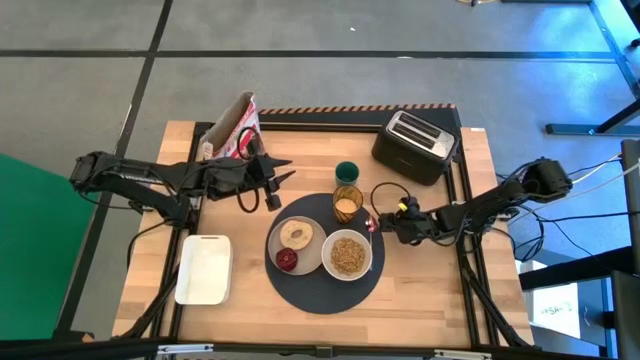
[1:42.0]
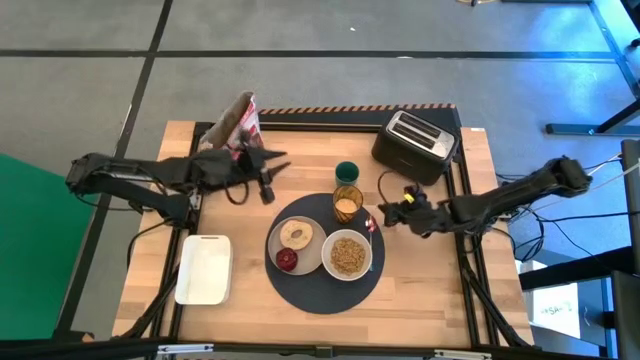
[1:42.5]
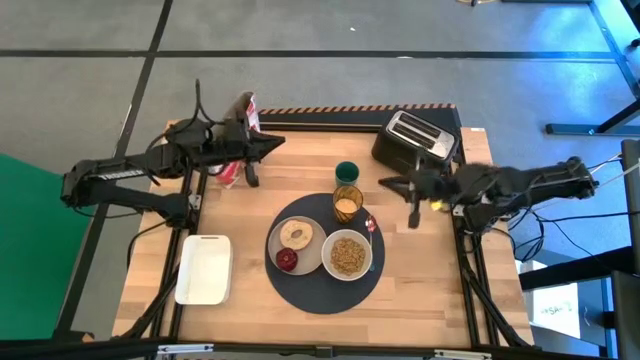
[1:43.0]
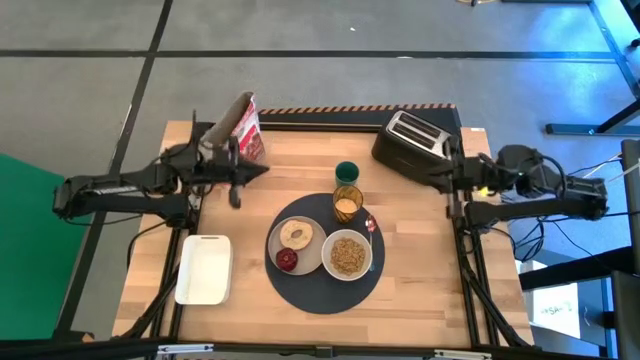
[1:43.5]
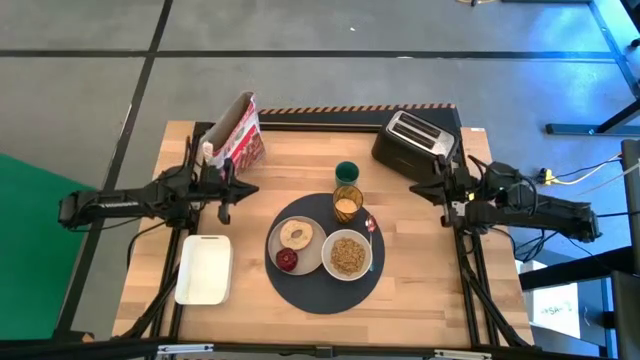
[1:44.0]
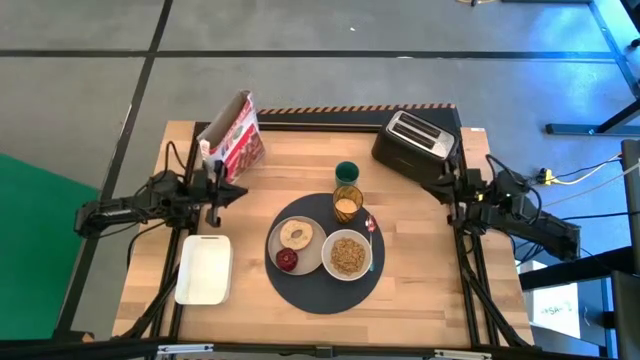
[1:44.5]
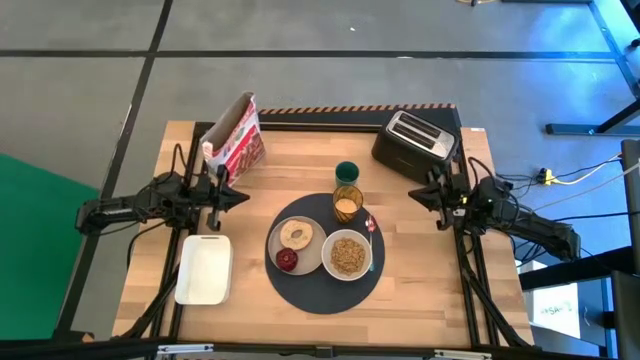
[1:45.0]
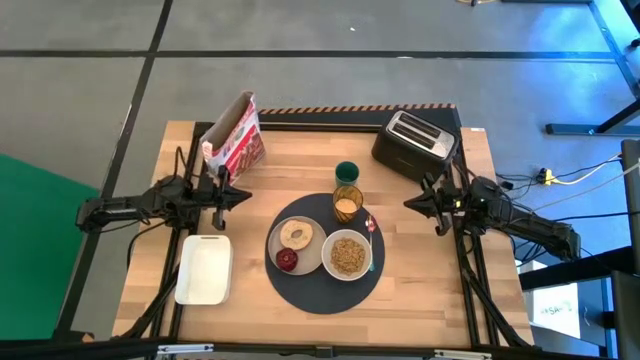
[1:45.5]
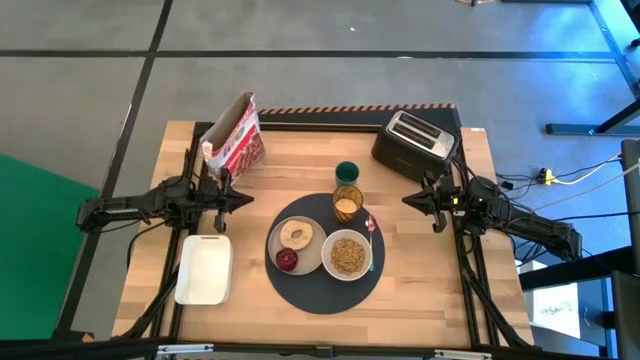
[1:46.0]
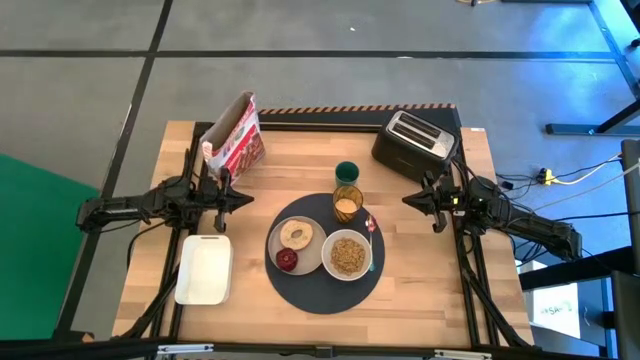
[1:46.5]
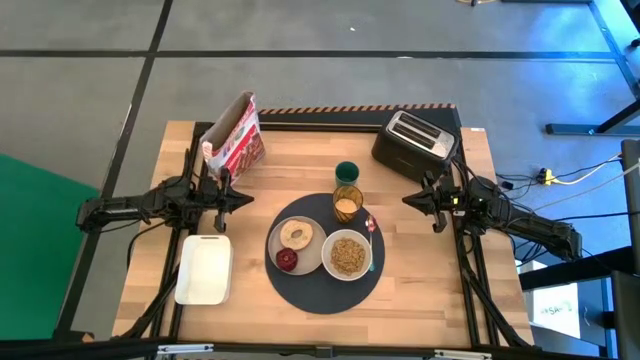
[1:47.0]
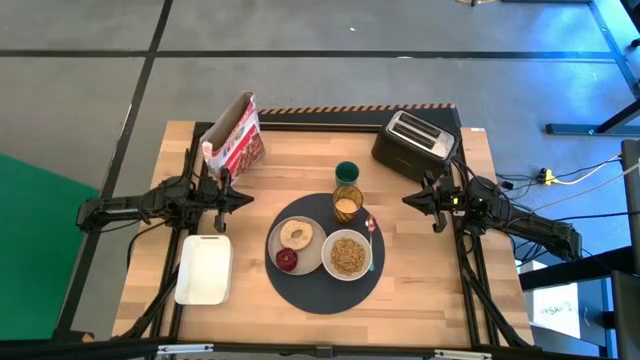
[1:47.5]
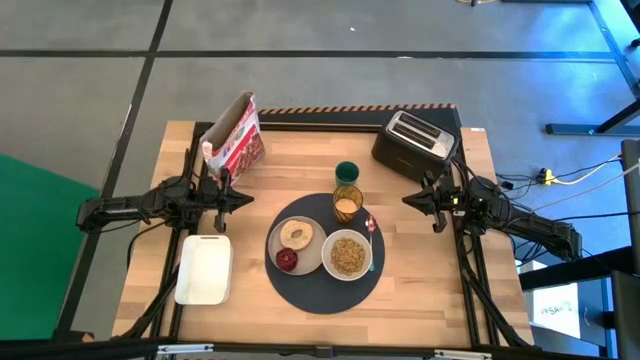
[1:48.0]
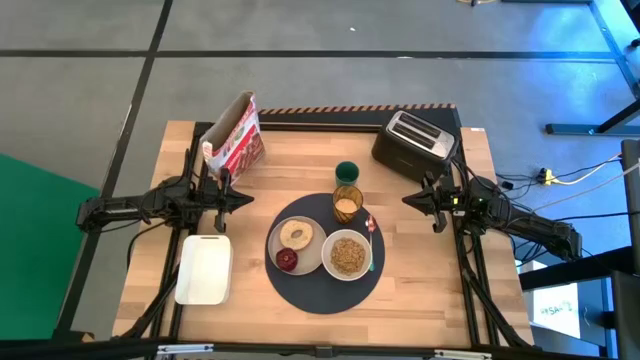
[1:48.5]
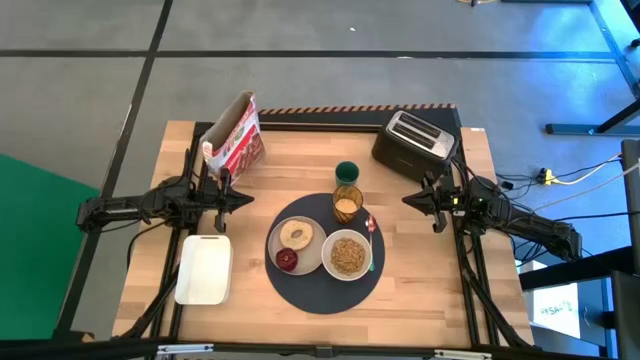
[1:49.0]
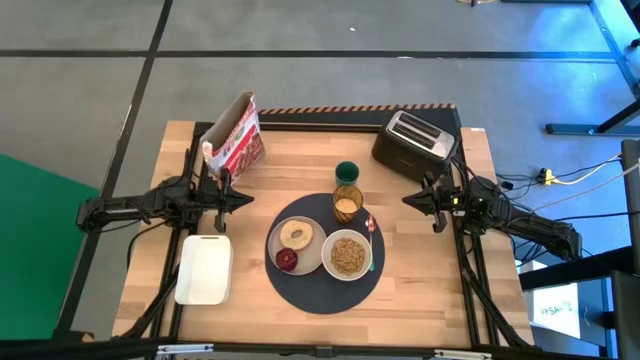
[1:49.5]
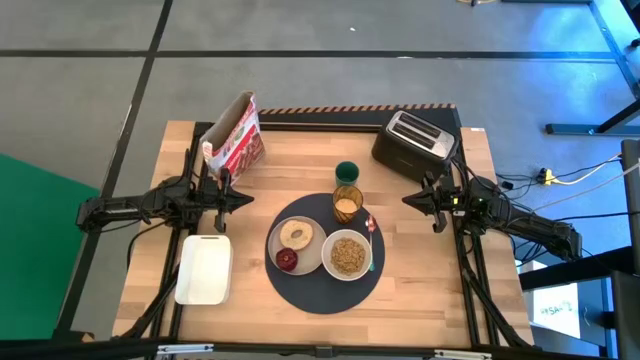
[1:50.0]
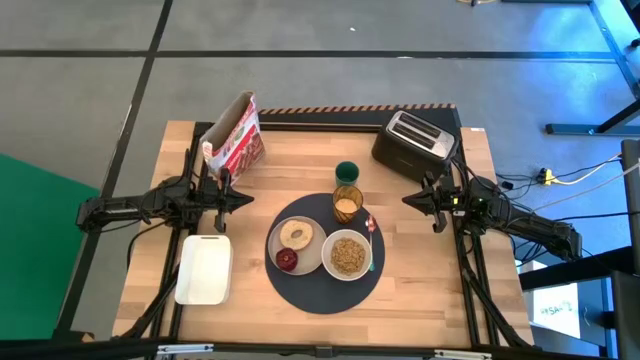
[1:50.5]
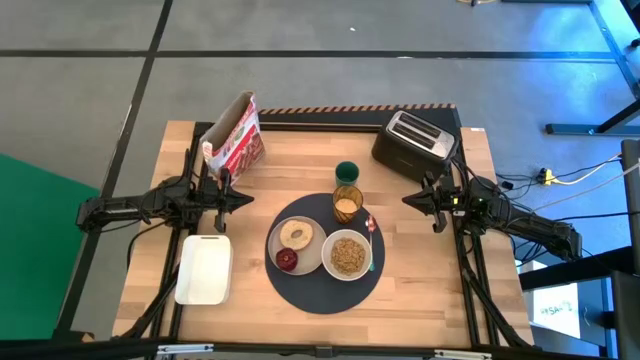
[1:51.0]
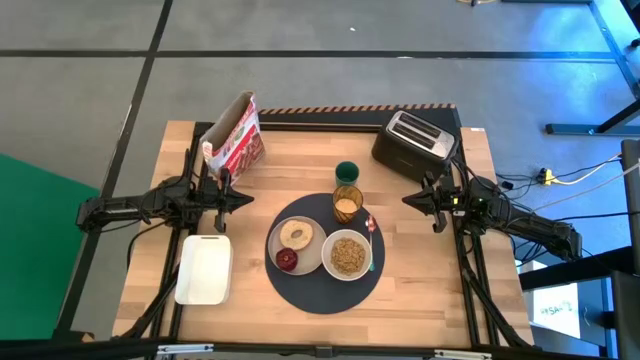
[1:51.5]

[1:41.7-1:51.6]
Task: Arrange a breakfast setting
Return to Home Position

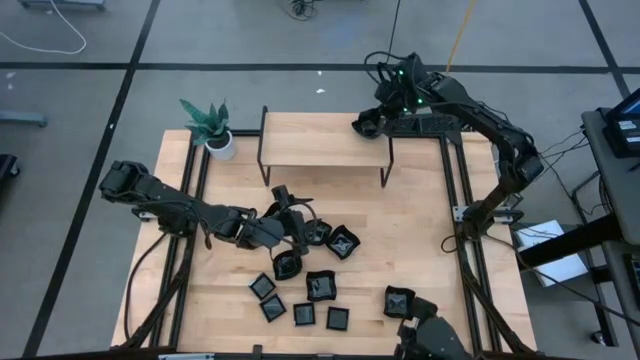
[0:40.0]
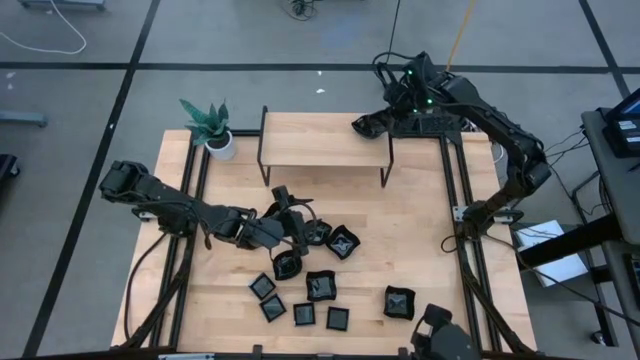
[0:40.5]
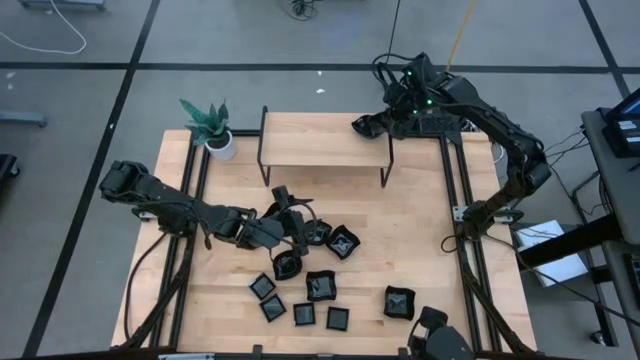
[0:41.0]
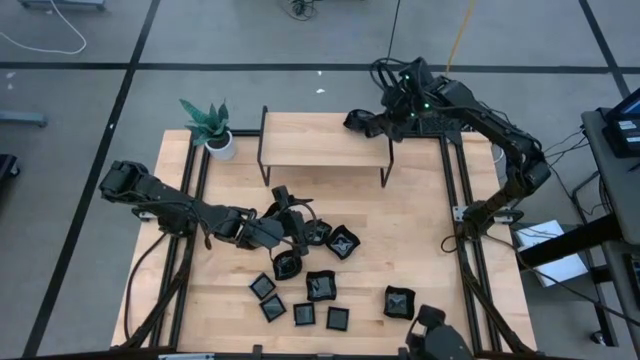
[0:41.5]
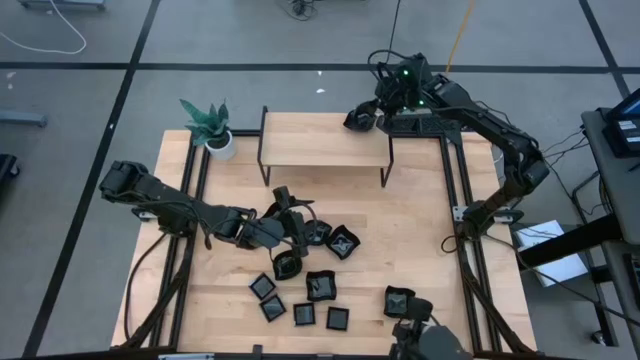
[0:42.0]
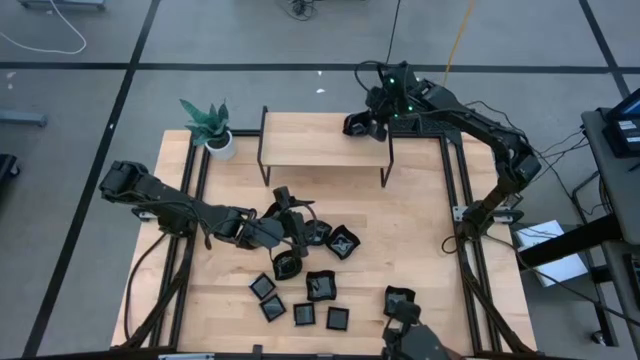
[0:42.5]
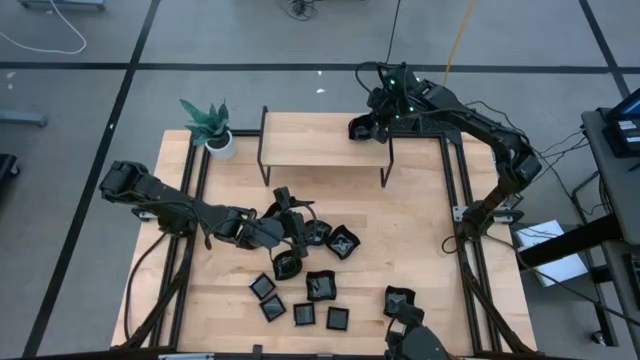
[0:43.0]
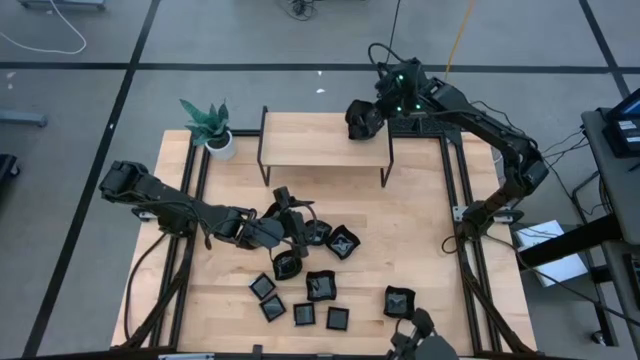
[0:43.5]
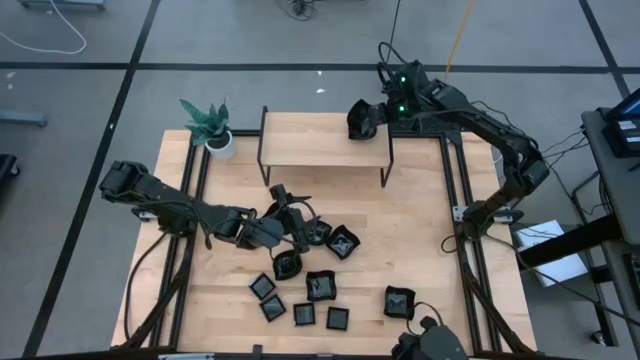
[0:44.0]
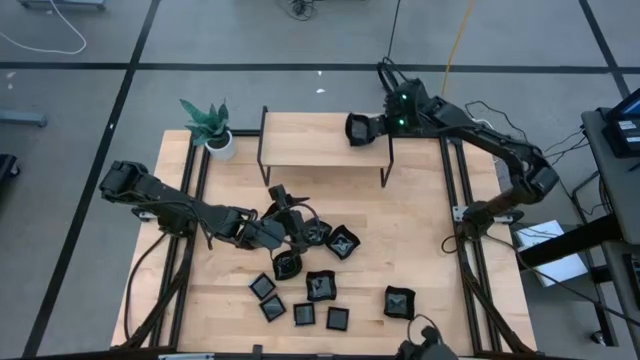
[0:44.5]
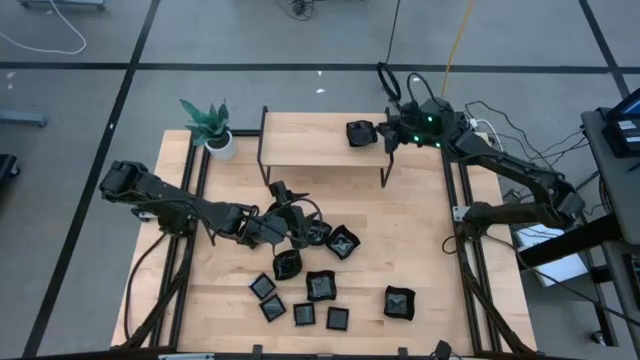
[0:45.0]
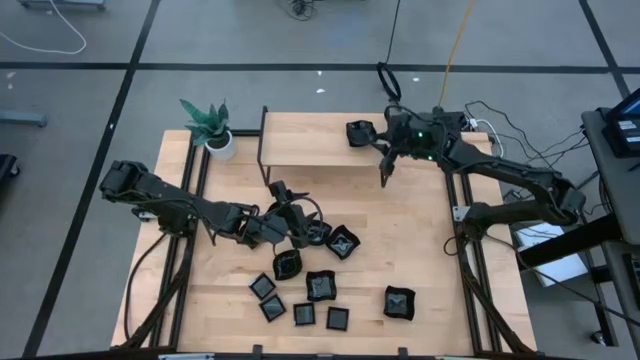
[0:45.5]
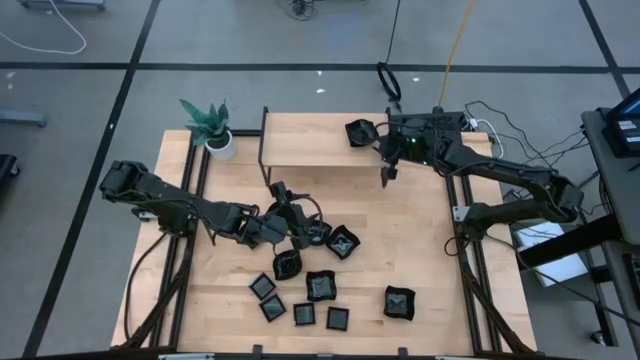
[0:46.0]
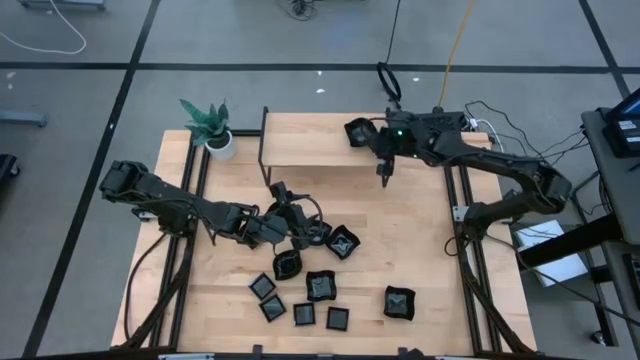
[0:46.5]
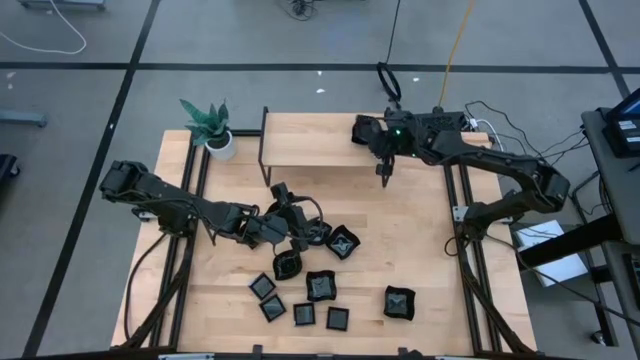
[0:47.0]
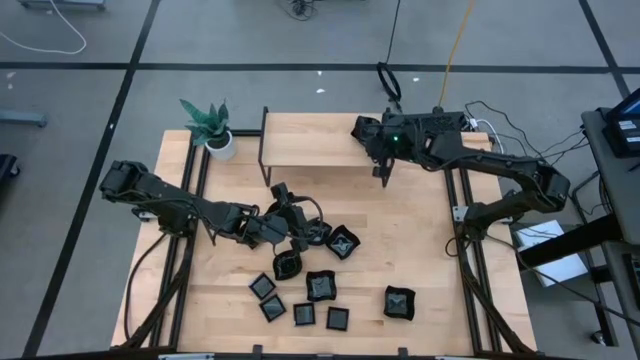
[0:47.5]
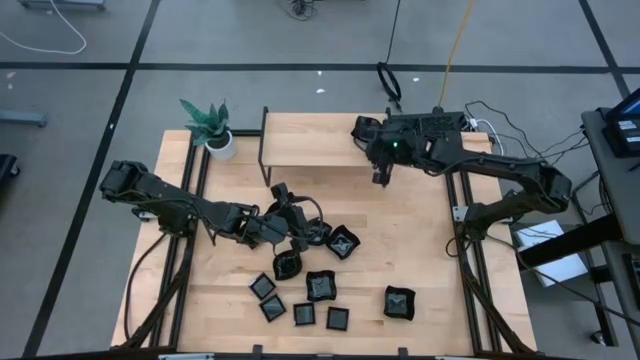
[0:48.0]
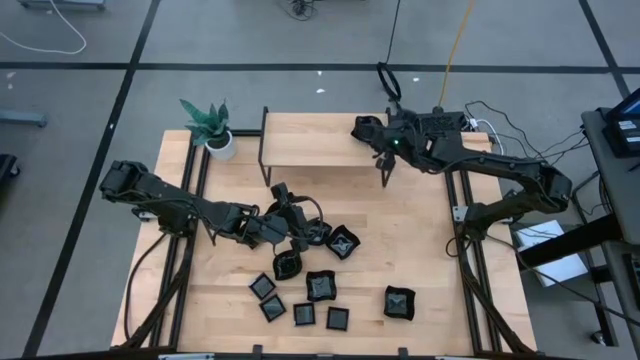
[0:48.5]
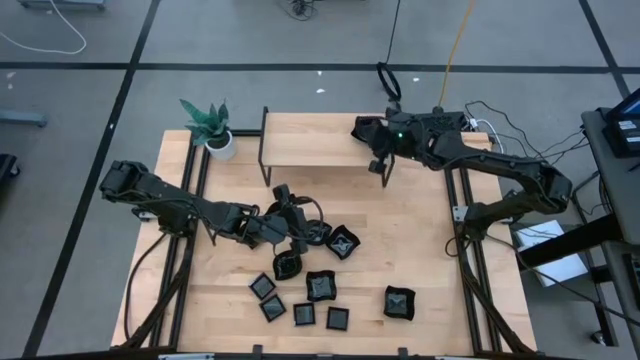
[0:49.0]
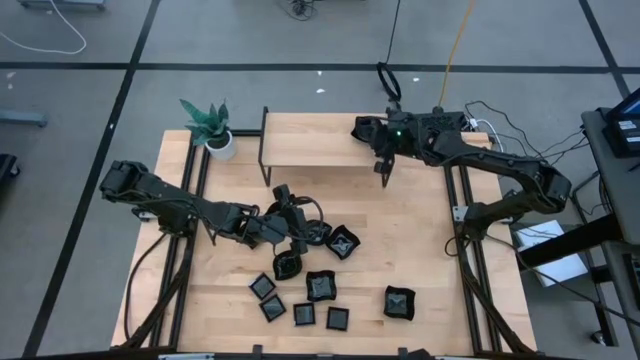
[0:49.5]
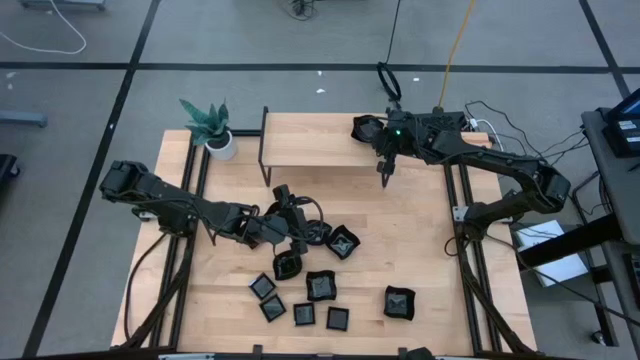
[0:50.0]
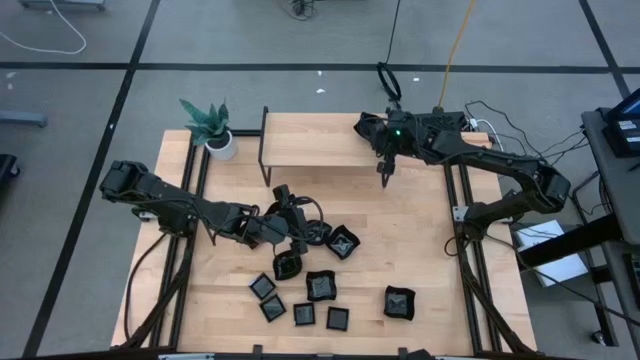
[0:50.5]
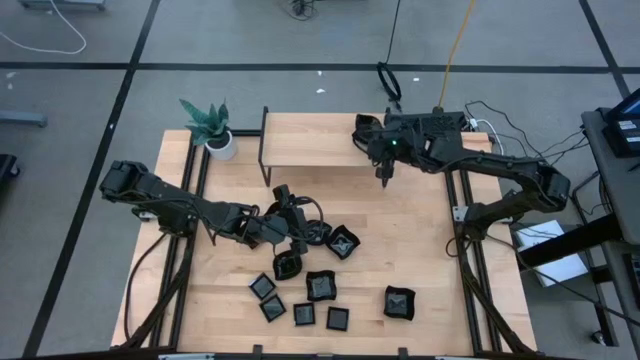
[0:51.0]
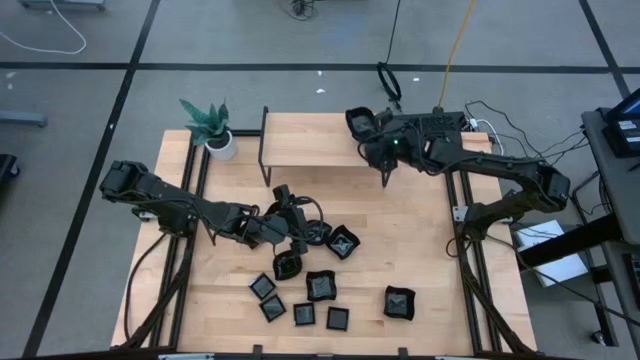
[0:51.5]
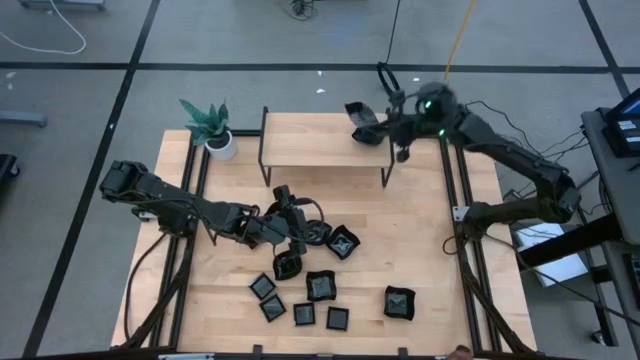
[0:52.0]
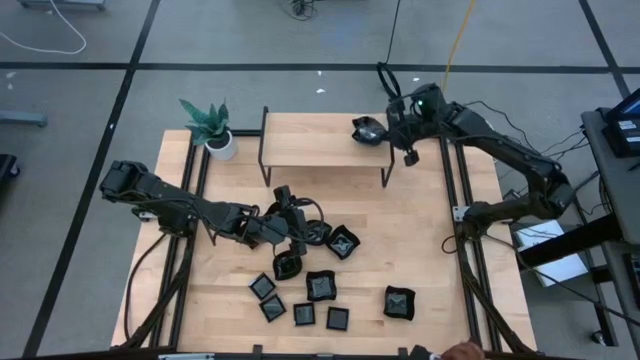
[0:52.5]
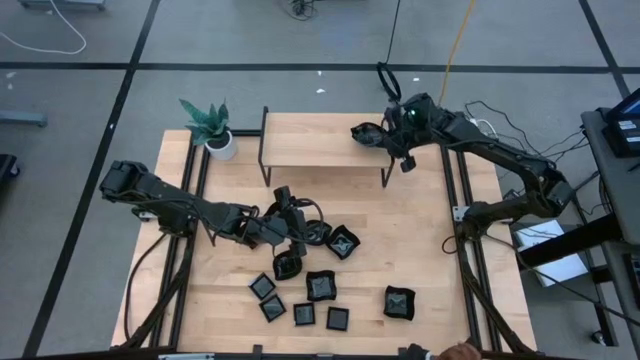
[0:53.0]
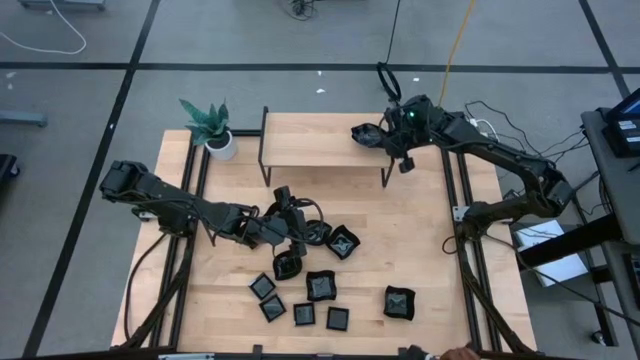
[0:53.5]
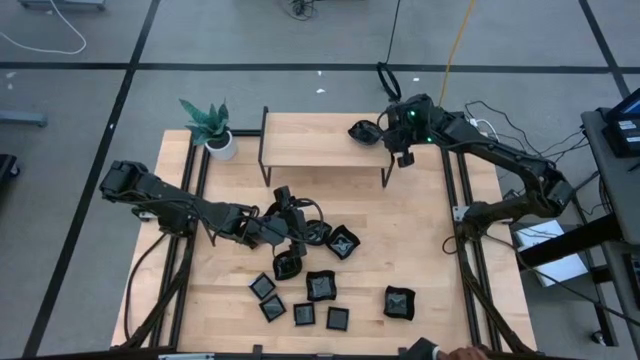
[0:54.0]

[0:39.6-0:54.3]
Task: Pick & Place Mini shaped plates
Stack the black leaf-shaped plate on top of the other black leaf-shaped plates on the shelf
